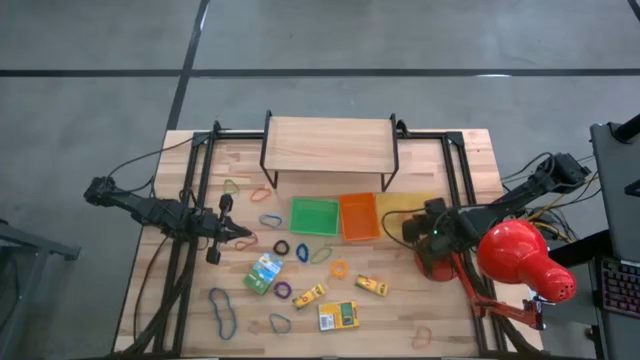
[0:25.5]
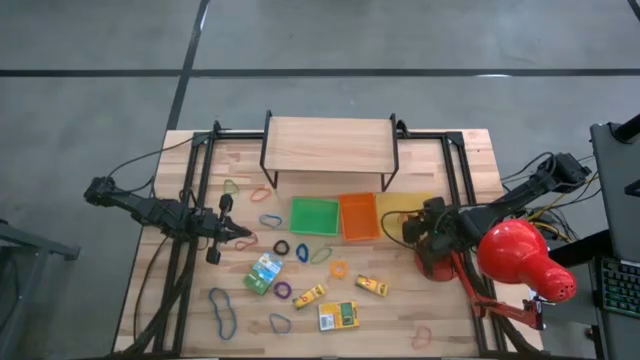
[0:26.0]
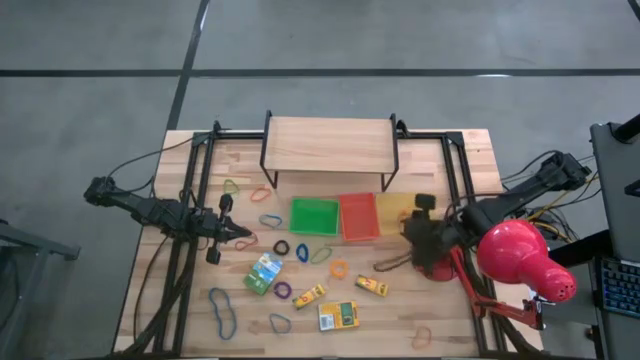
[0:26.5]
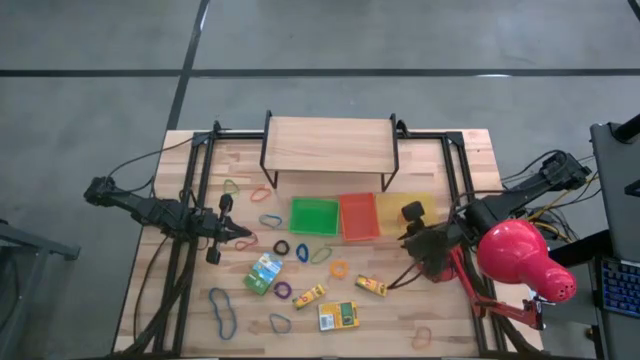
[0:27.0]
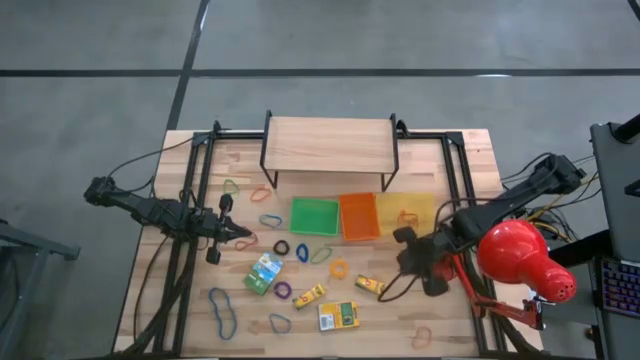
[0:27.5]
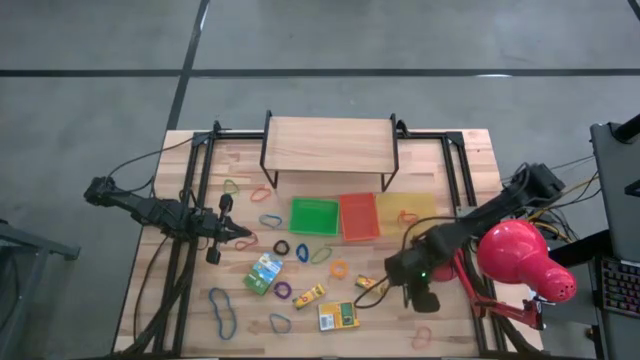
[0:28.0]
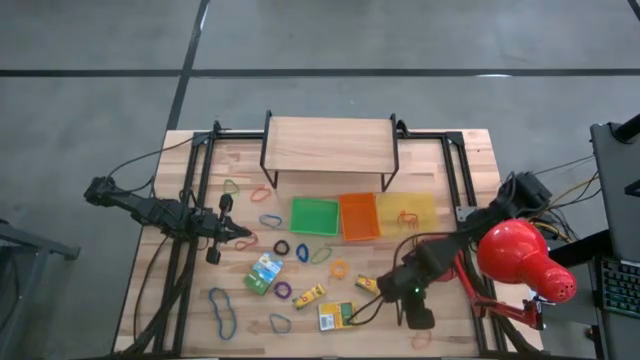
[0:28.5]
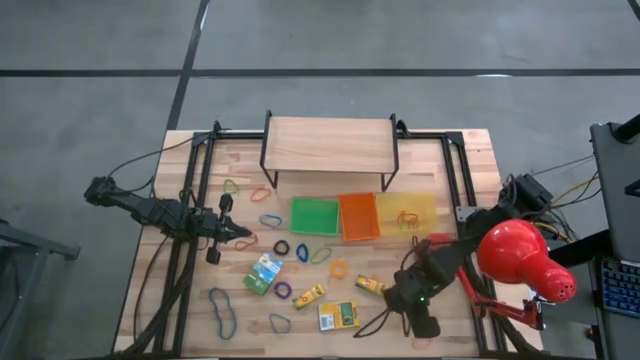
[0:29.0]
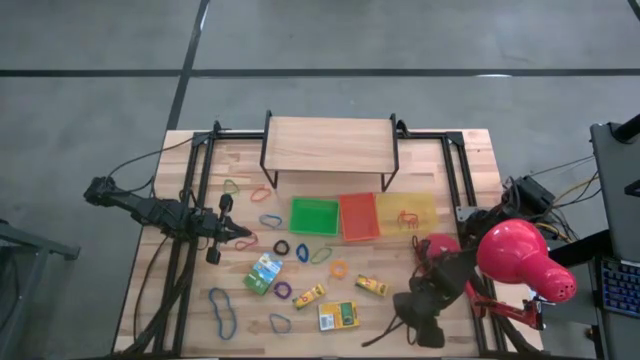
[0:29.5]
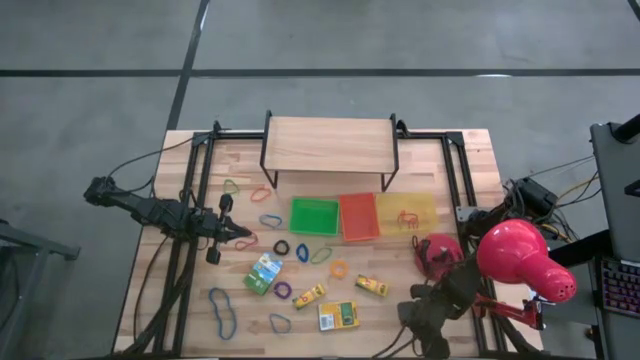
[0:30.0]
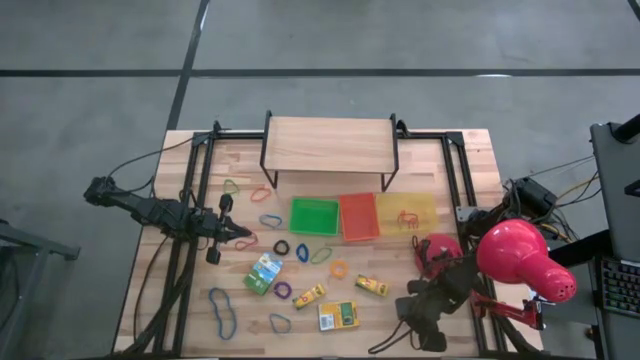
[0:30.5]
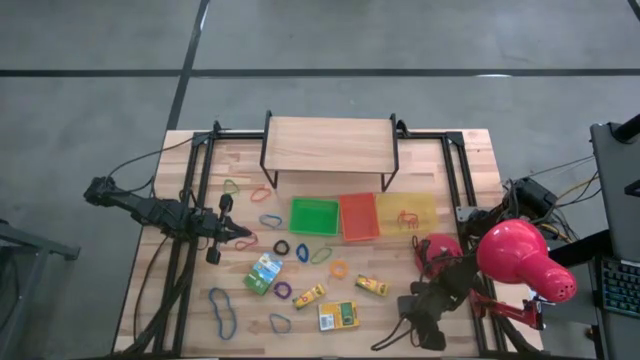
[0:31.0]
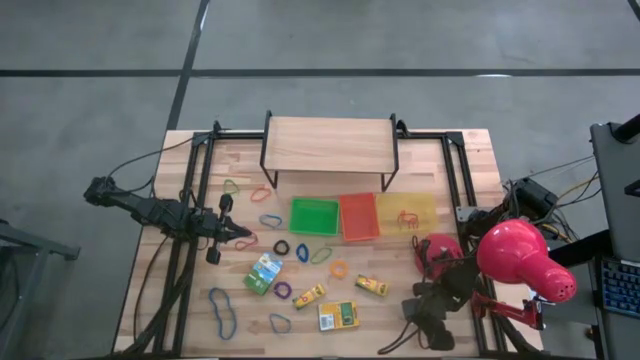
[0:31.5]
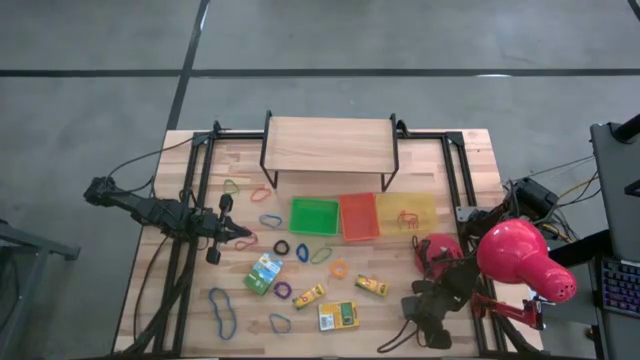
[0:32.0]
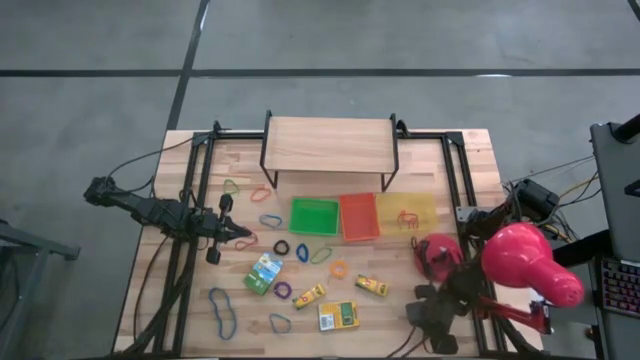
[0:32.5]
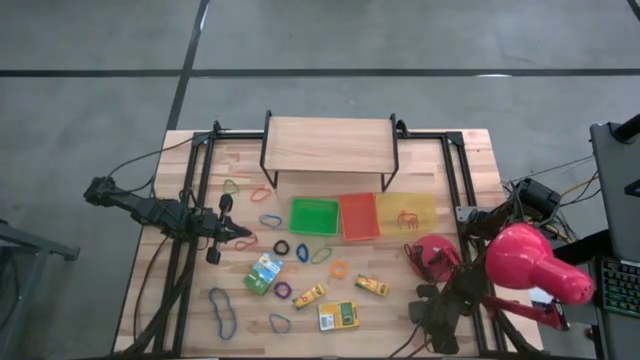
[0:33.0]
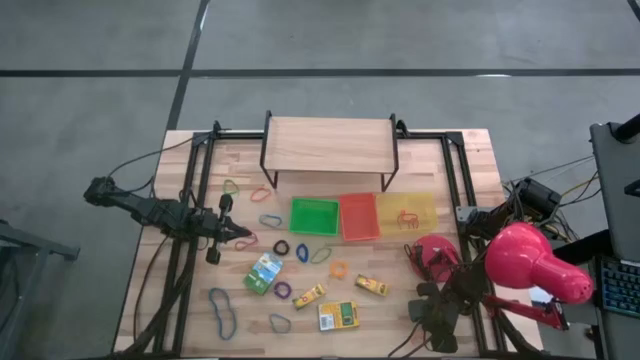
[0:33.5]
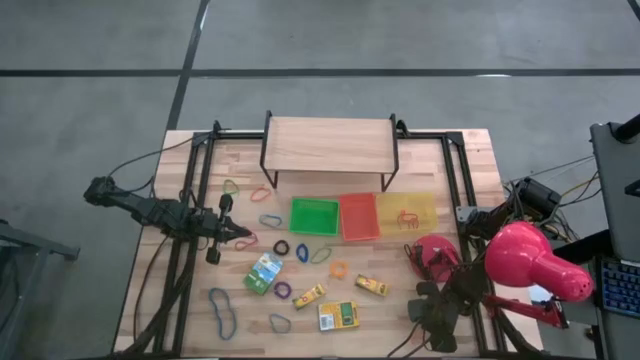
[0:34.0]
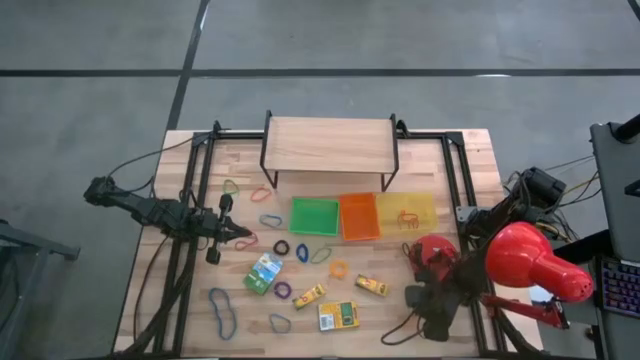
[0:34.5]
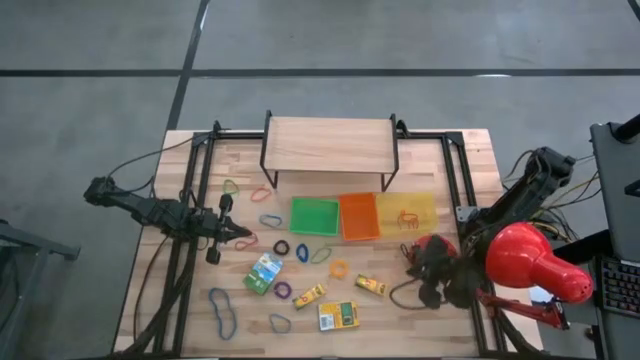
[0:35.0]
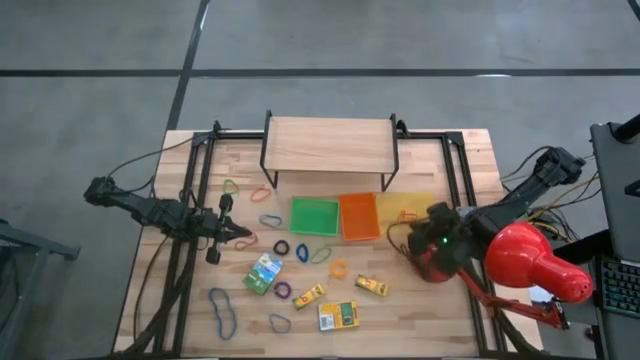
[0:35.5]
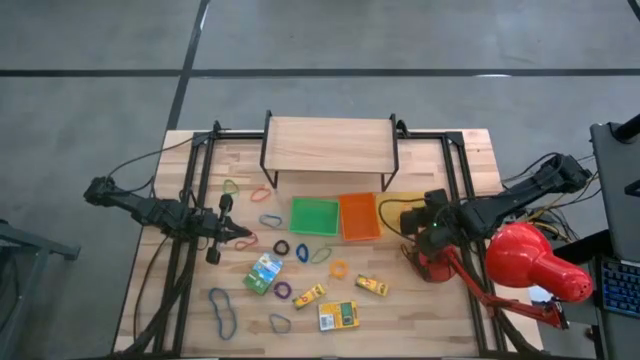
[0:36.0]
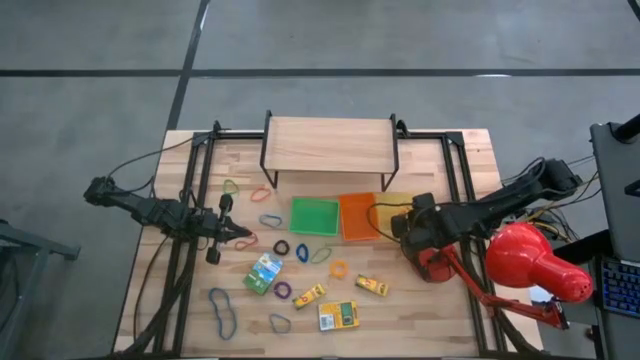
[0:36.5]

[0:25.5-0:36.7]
Task: Pick & Place Office Desk Supplies
Put the bottom orange rubber band into the yellow bin

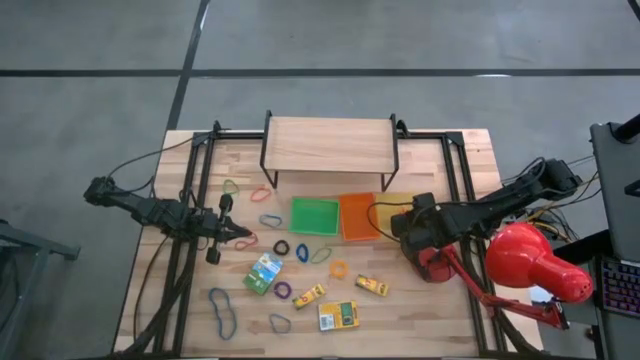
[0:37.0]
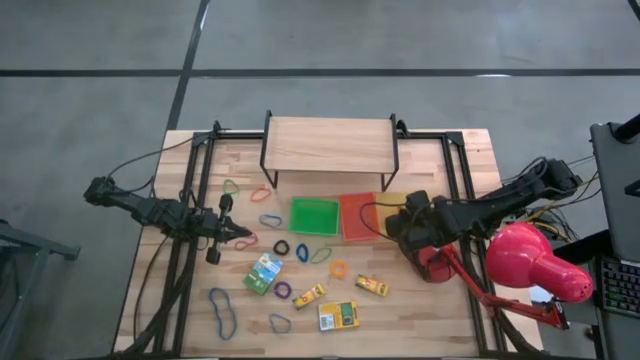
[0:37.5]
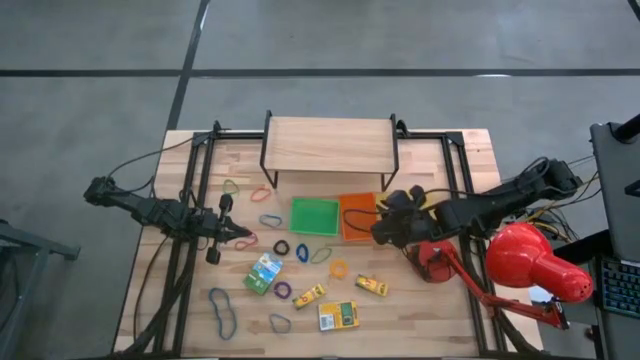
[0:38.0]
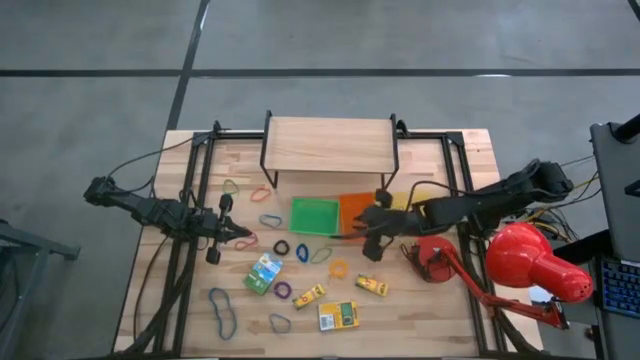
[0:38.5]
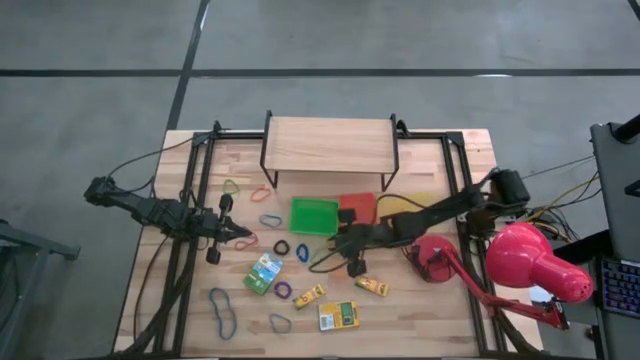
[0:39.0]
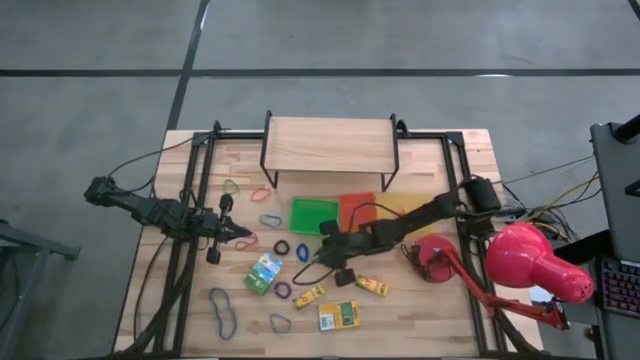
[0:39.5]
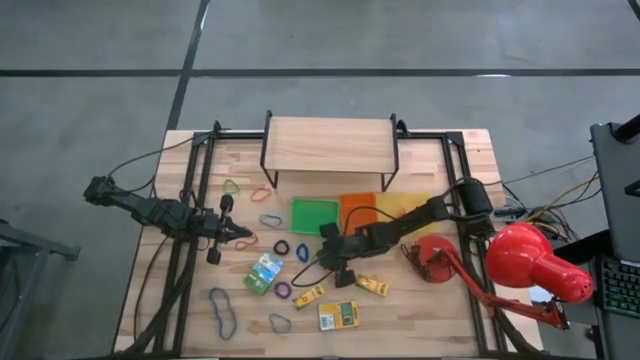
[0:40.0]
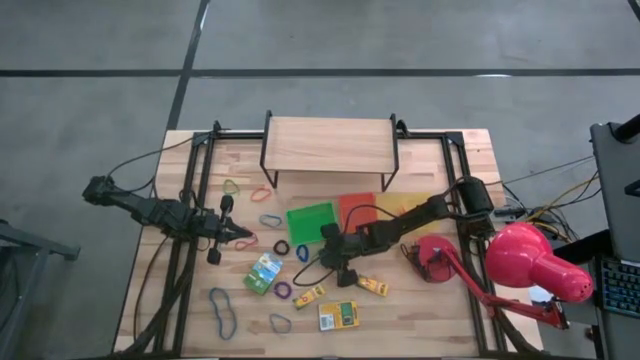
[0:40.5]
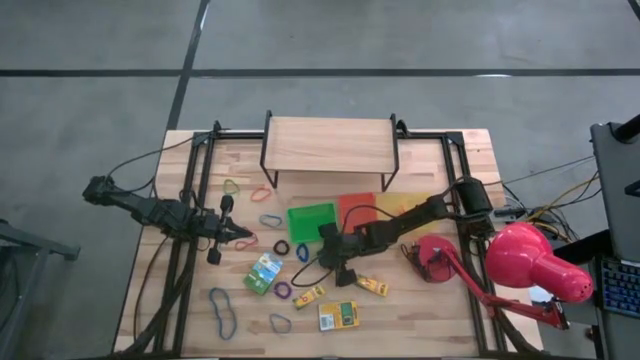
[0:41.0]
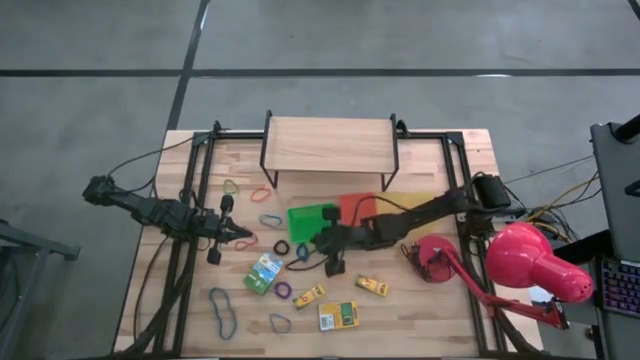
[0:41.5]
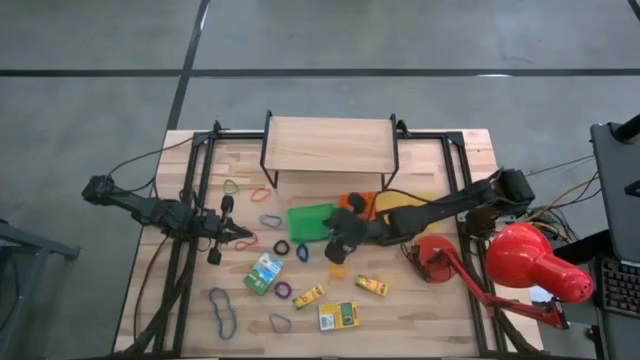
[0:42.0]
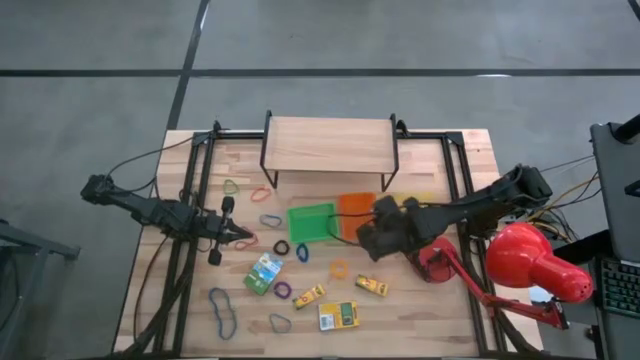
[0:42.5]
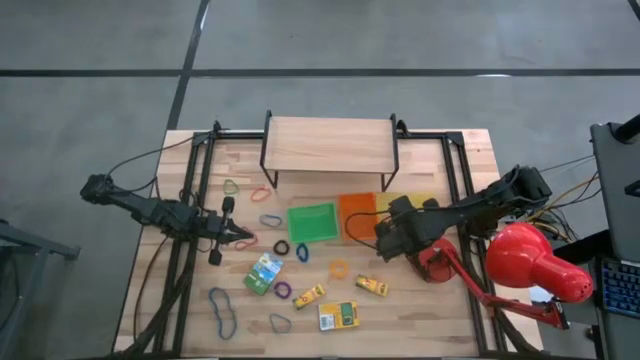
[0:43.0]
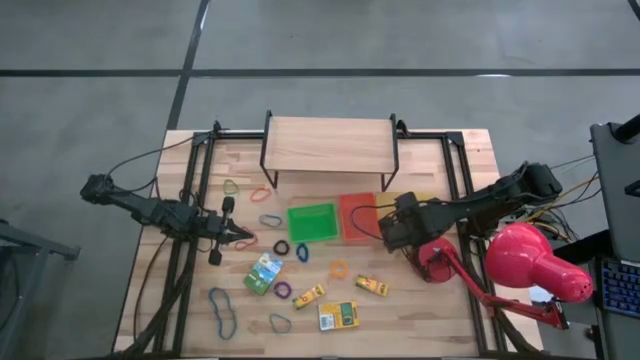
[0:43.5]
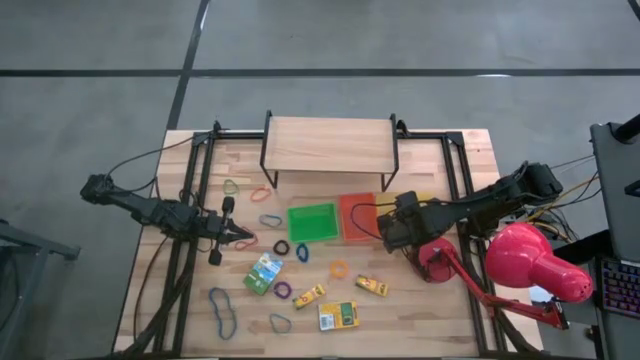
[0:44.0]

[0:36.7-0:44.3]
Put the bottom green rubber band into the yellow bin

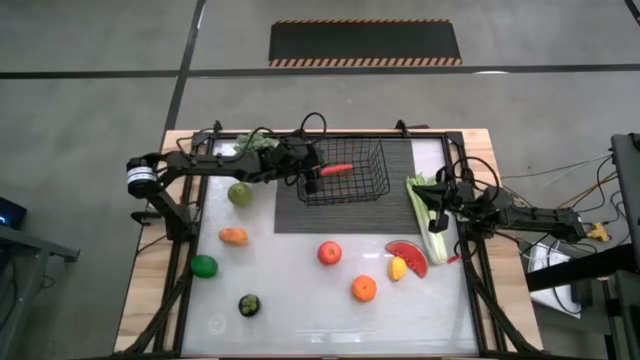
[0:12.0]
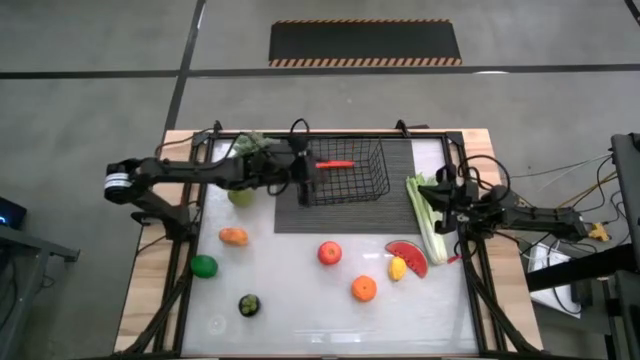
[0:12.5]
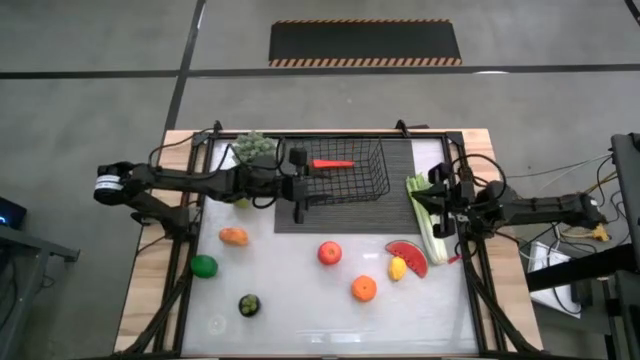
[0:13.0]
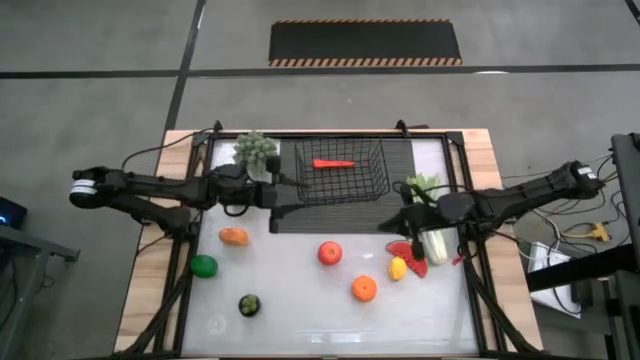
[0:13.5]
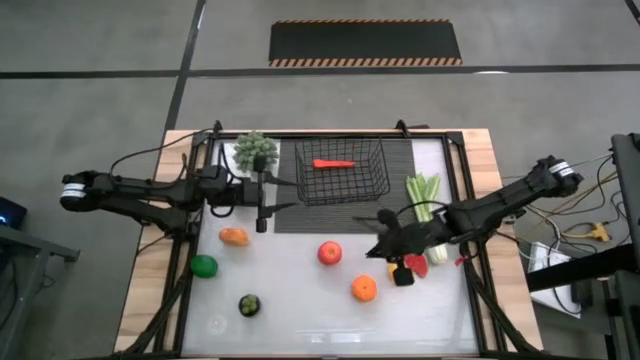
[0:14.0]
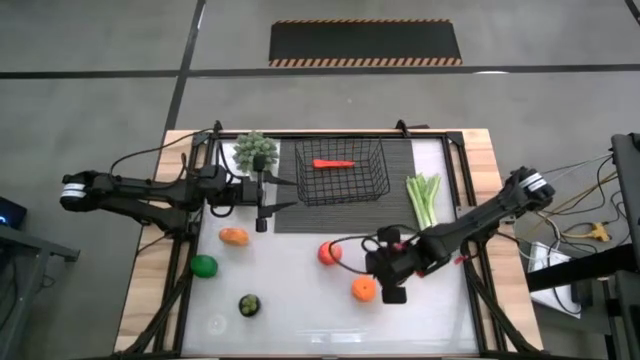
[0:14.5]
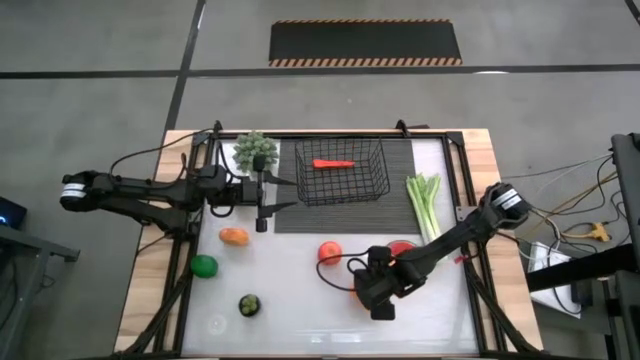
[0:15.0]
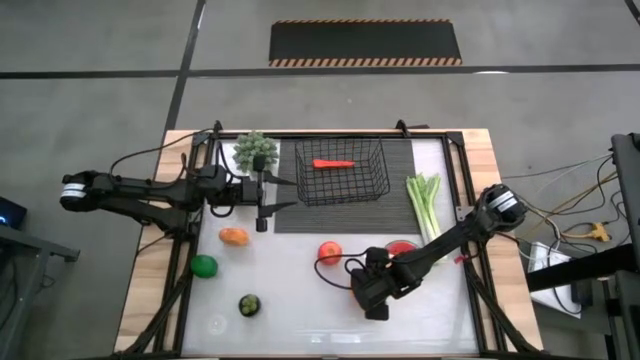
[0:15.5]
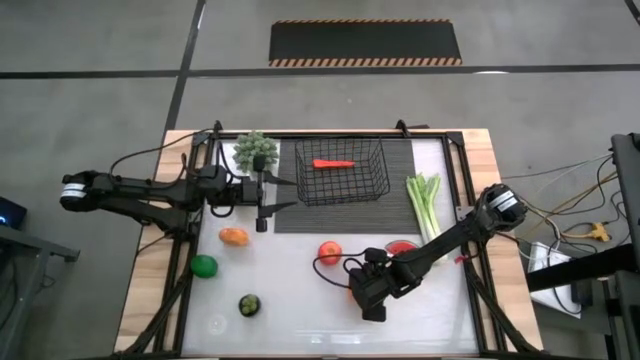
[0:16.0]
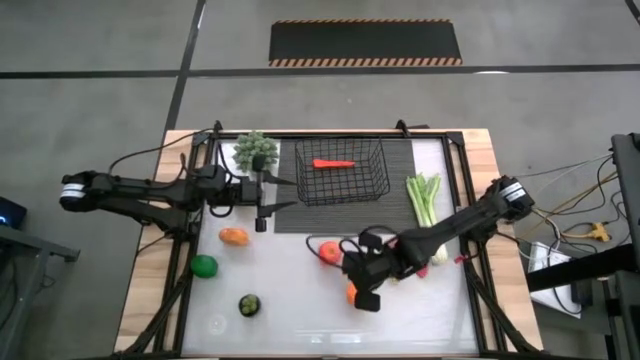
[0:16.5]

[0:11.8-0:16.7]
Task: Build produce basket
Put the orange into the black wire basket
